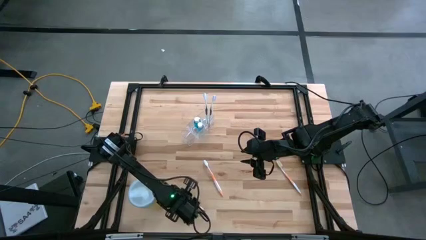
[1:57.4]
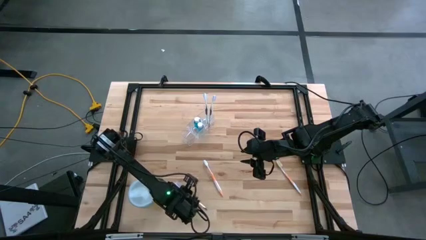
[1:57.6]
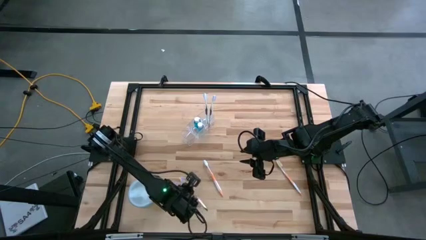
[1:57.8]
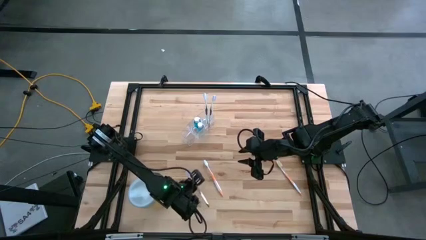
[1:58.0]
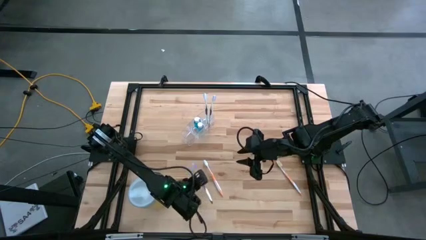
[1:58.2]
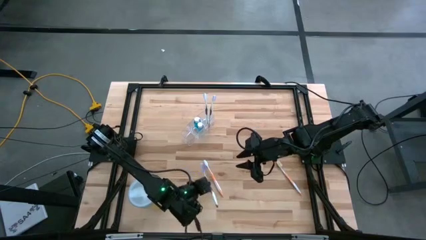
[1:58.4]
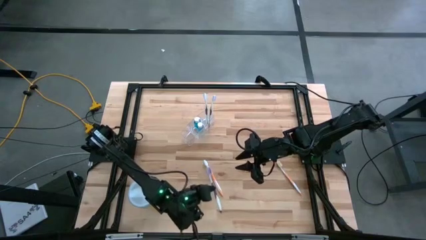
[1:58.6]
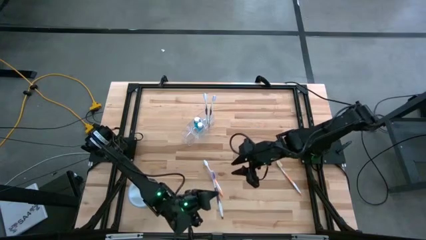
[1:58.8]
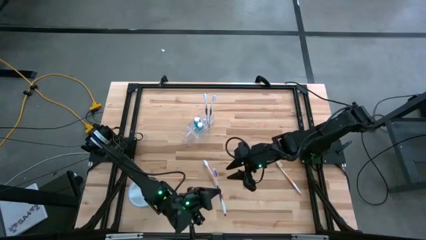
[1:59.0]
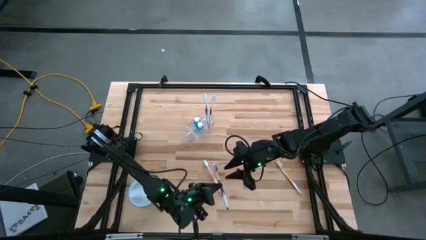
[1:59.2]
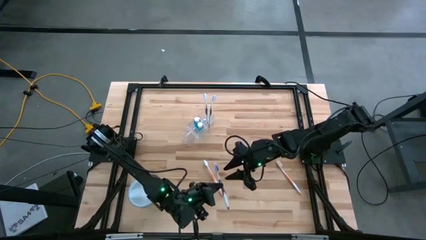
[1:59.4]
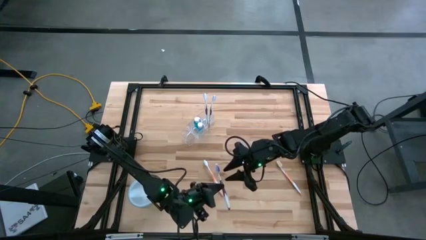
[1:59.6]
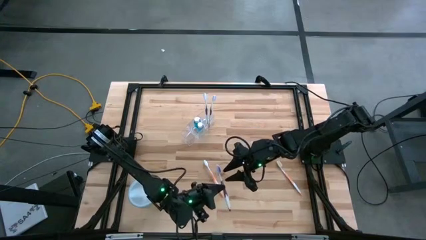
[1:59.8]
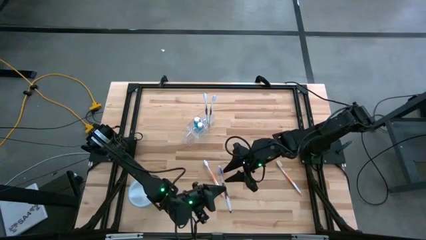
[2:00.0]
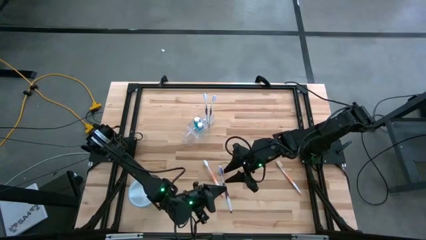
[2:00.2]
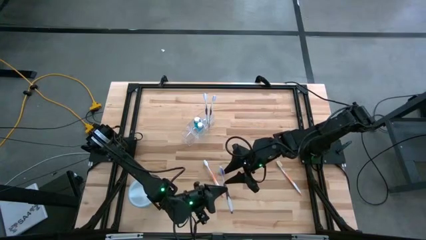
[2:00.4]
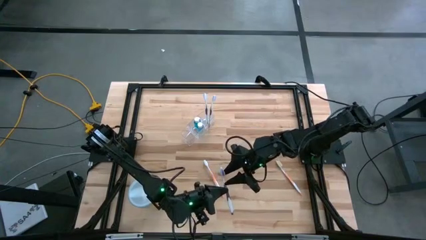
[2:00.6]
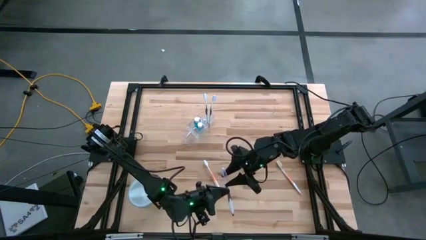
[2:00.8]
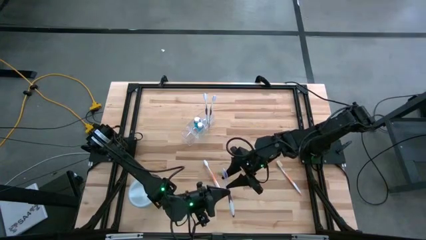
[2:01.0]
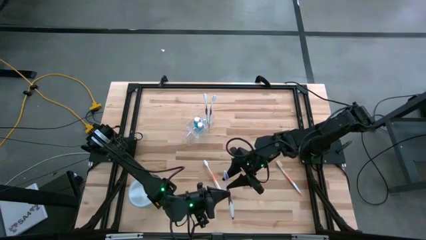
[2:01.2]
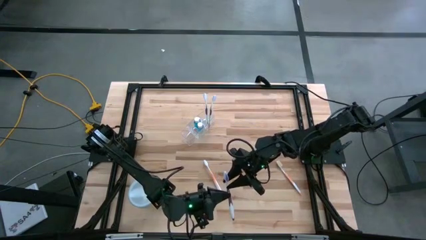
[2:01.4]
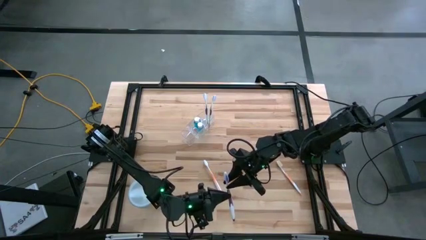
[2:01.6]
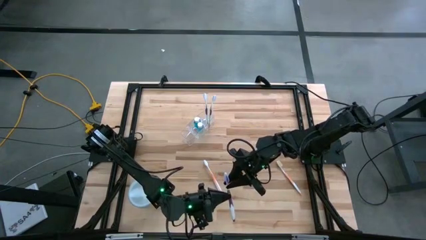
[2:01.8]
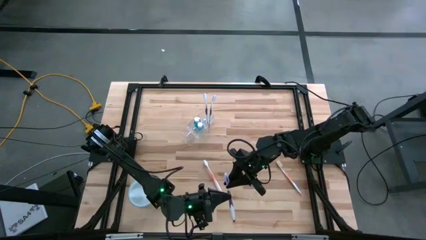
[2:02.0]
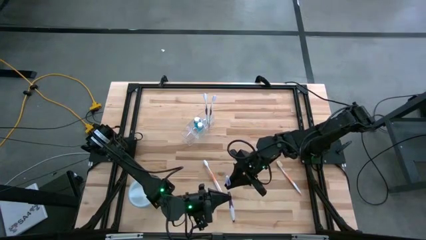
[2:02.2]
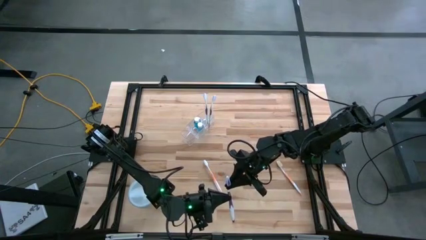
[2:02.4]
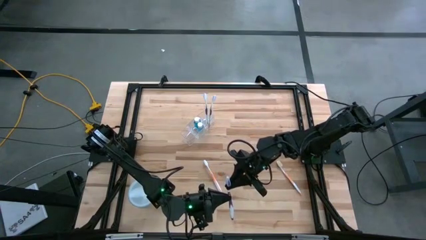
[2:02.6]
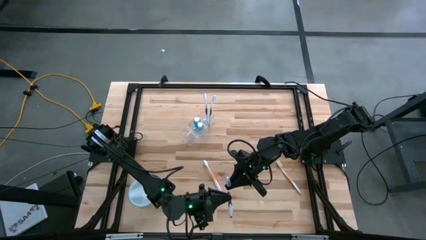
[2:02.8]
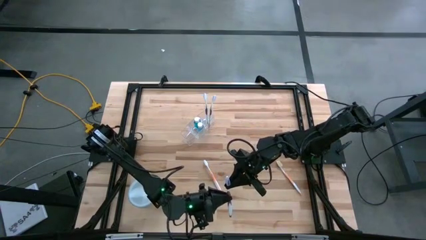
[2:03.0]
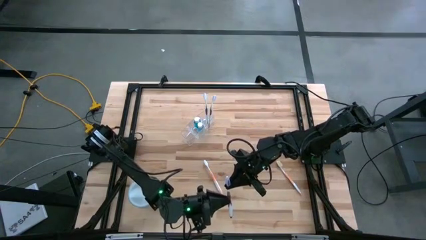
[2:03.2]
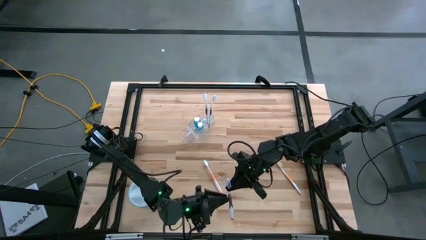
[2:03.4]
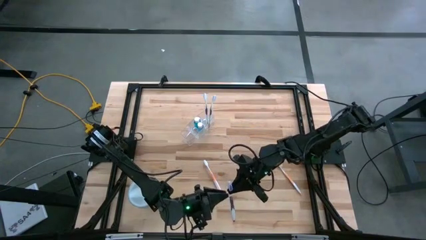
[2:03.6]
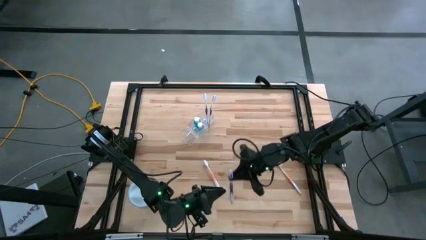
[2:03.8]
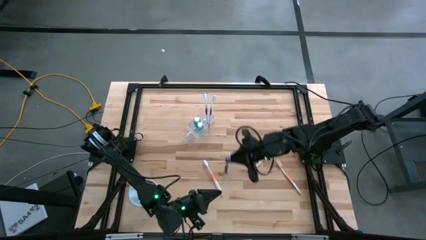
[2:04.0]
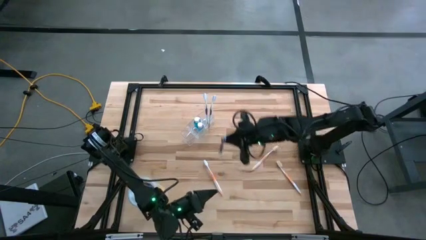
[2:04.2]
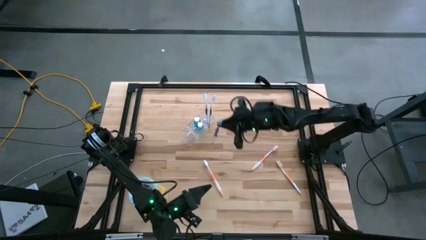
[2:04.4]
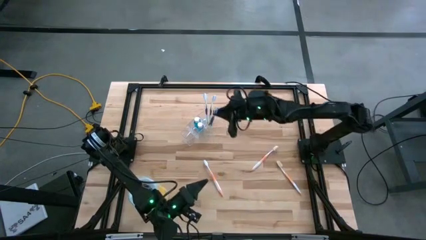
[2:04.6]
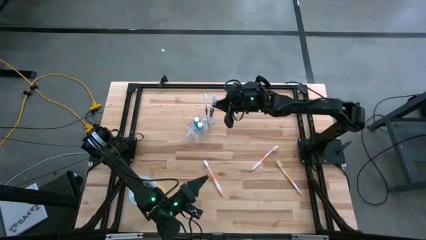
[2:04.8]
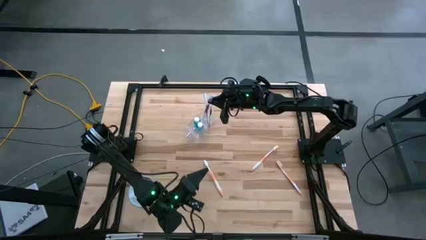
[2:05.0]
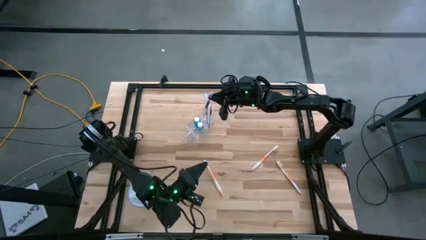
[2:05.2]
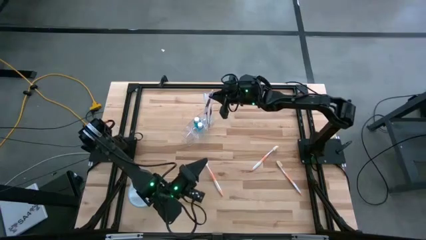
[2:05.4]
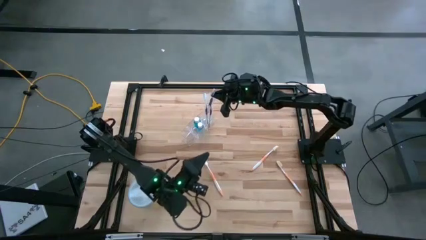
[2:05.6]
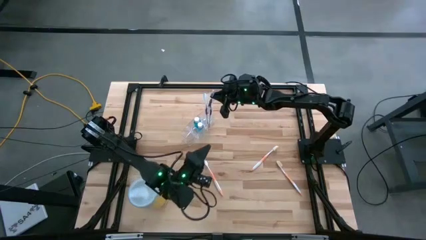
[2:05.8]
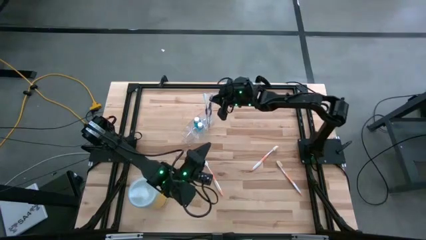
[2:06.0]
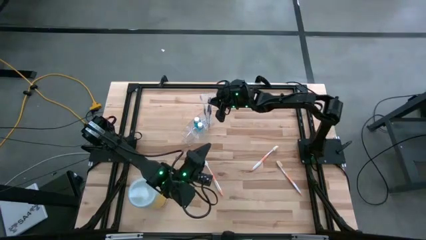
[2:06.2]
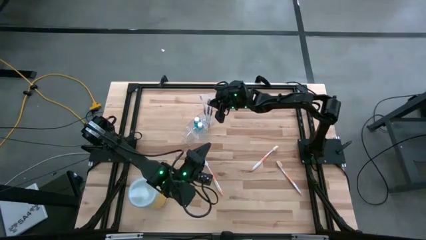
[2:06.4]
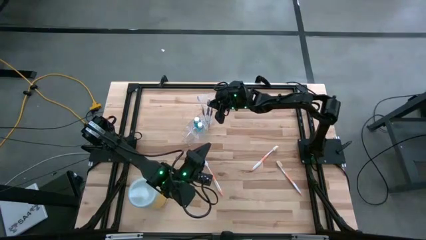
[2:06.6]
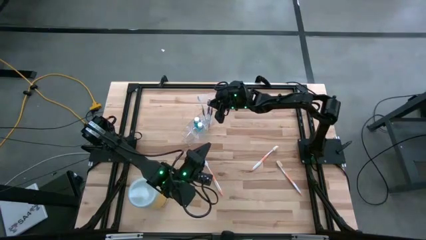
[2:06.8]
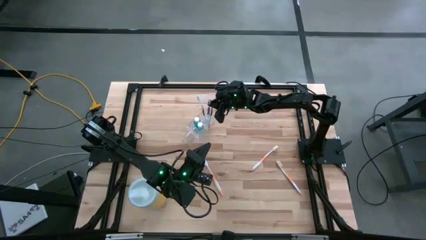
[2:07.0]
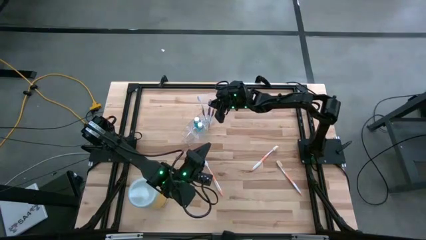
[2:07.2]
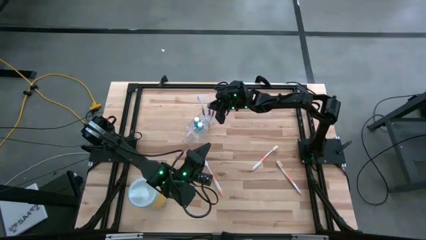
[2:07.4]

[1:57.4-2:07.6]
Task: Pick & Place toothbrushing station
Put the violet toothbrush into the transparent organizer
